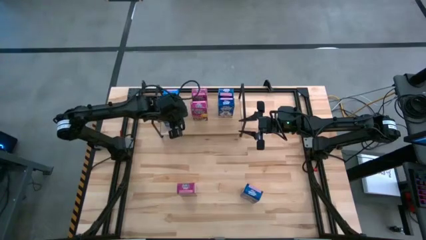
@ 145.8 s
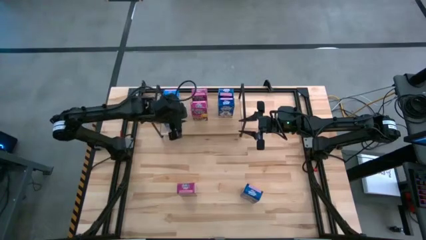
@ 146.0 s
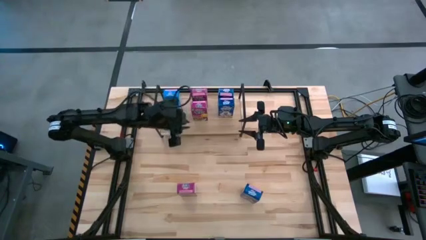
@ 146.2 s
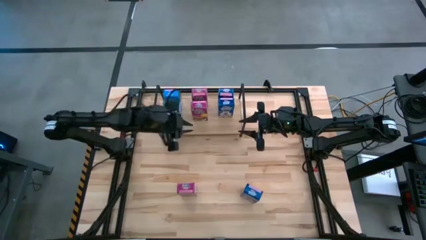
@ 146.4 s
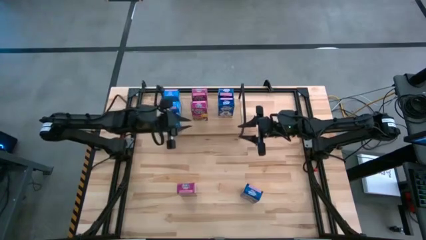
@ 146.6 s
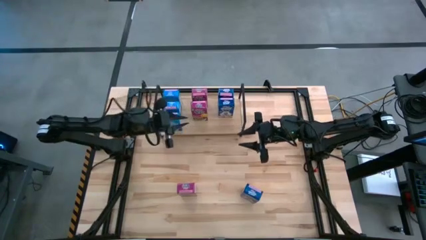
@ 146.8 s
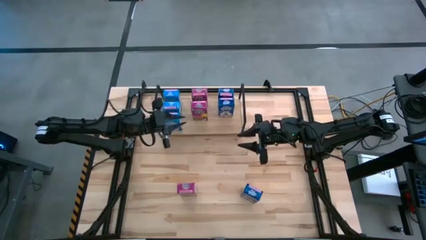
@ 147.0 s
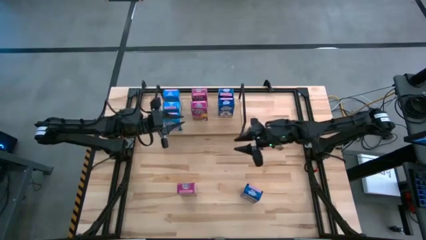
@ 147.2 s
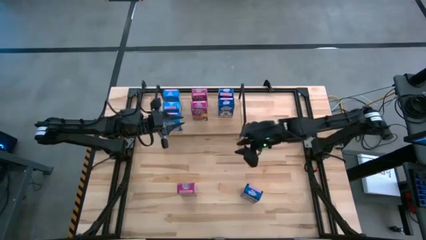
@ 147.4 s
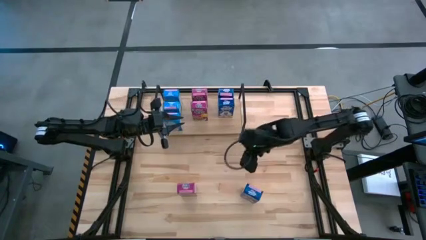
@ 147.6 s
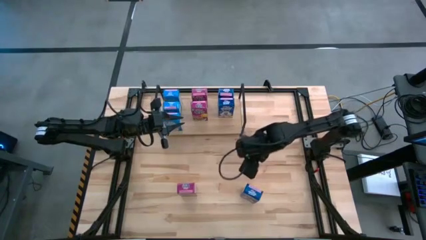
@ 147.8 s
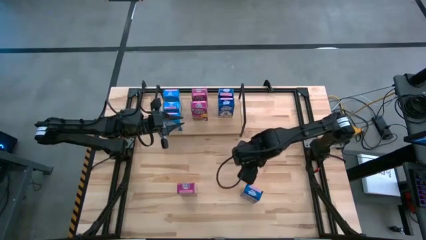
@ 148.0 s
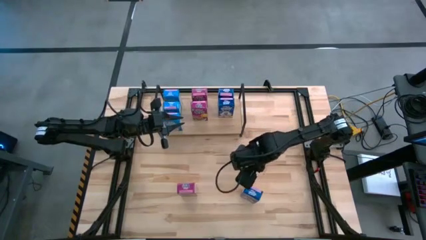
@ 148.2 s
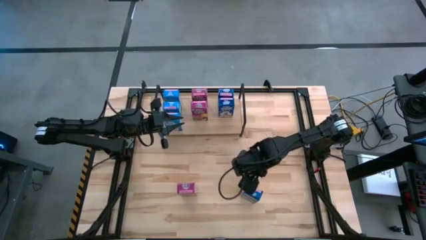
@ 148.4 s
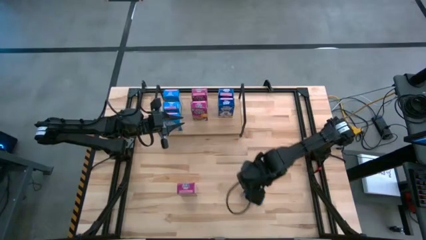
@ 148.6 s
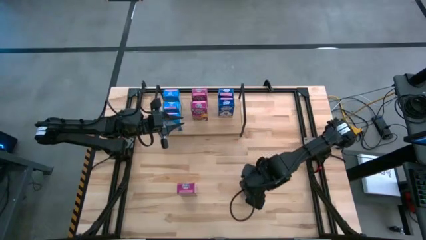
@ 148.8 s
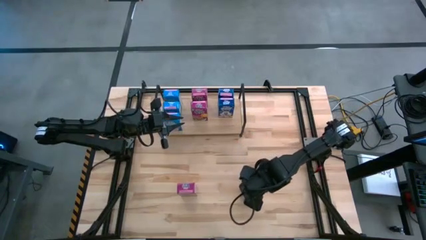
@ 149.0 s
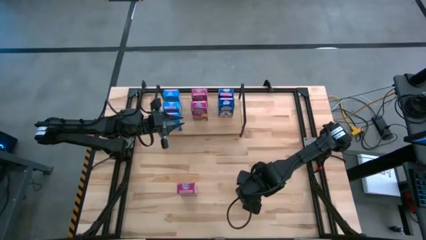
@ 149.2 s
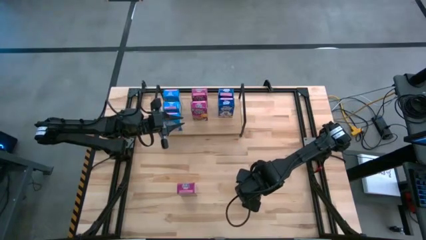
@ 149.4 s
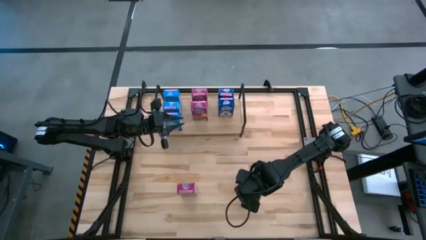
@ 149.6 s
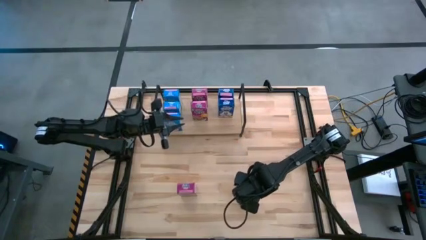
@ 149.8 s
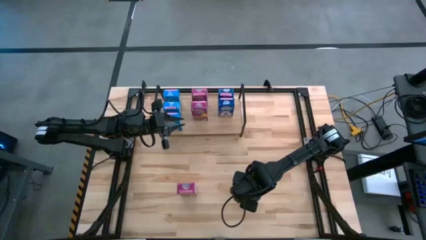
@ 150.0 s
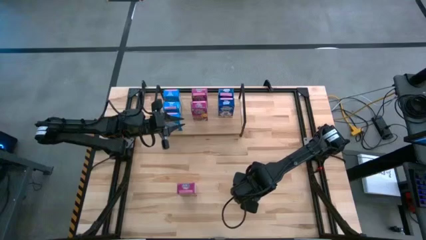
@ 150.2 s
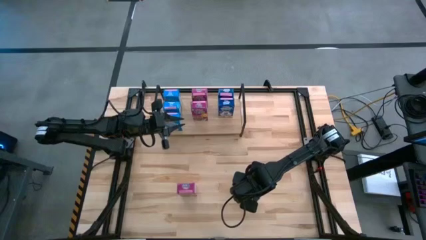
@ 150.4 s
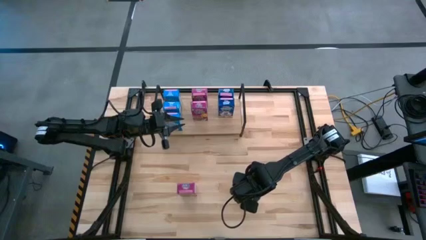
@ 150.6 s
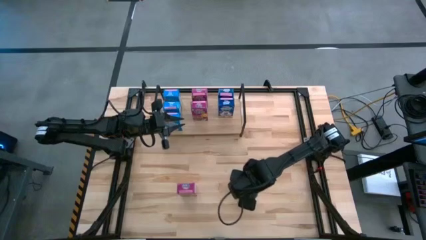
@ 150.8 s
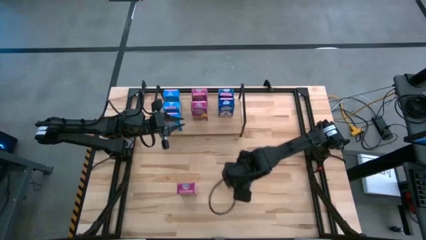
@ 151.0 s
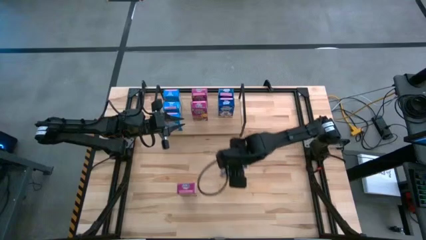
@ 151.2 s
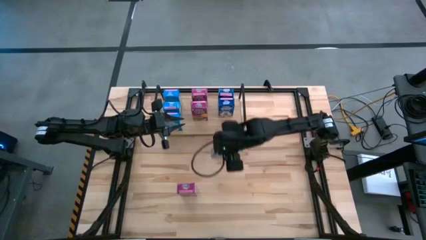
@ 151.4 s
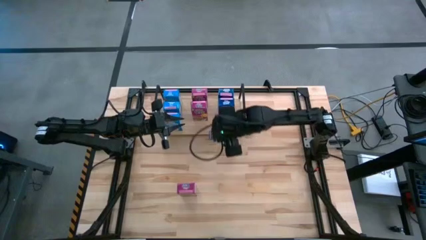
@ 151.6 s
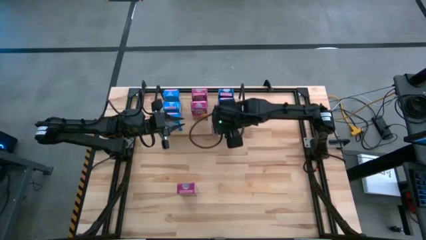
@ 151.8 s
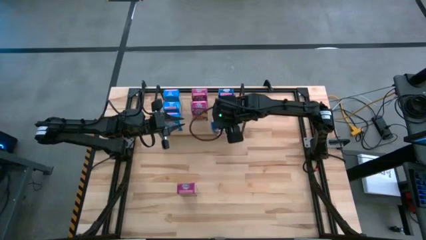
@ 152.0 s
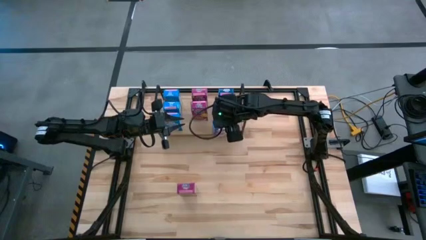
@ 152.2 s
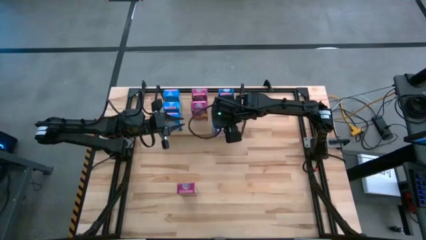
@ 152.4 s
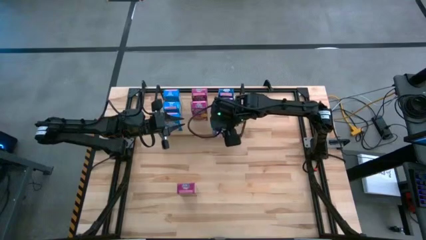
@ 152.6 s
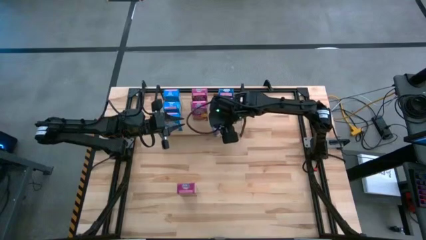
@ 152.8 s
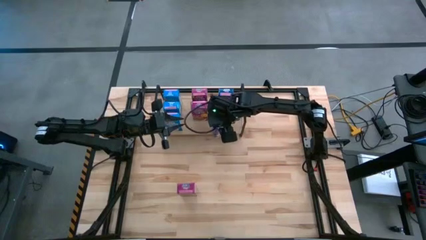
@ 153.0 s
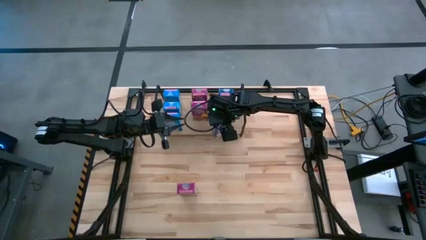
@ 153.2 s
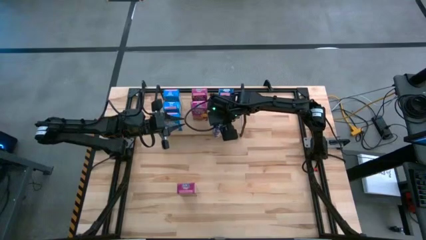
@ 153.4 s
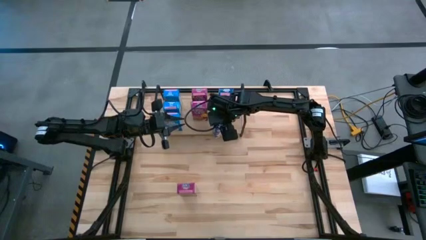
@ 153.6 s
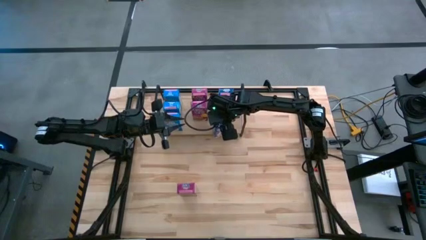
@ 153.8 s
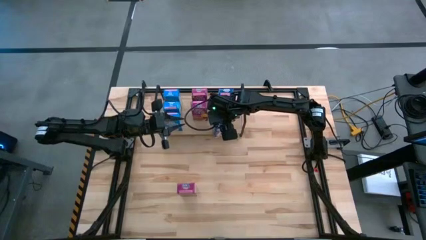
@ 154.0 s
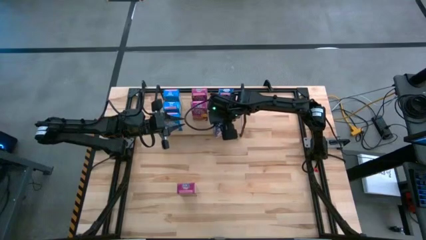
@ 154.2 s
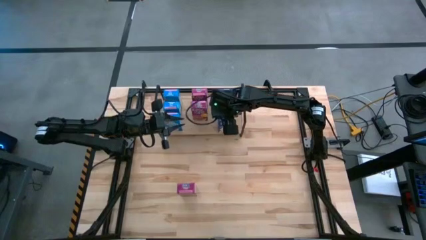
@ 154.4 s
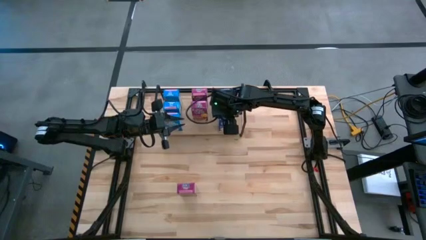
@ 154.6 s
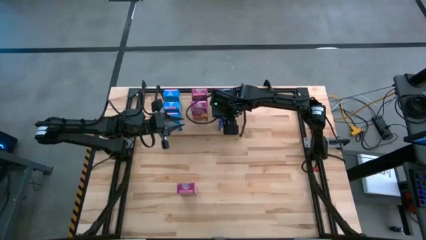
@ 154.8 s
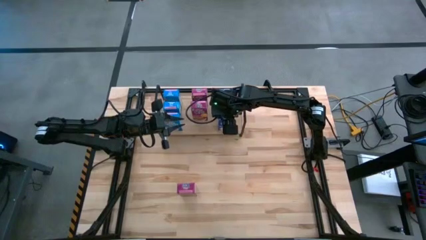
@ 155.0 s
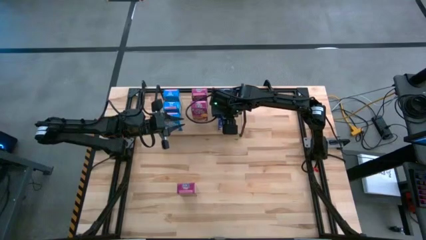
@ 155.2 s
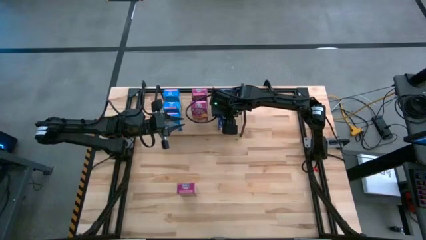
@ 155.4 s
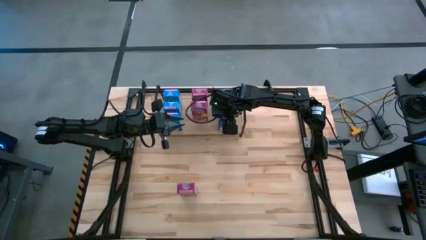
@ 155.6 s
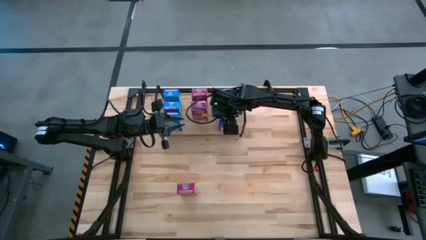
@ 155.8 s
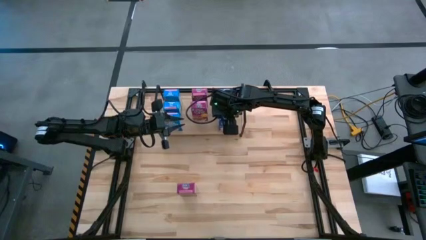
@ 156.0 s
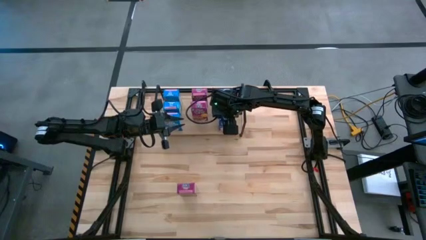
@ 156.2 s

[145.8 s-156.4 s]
Task: Stack cereal on shelf
Put the blue cereal box on the shelf aligned with the blue cereal box

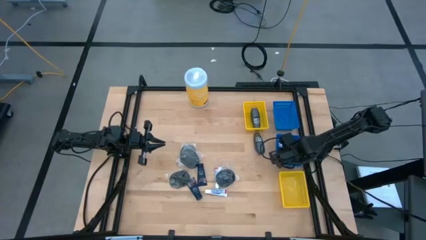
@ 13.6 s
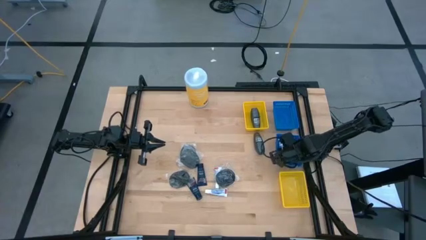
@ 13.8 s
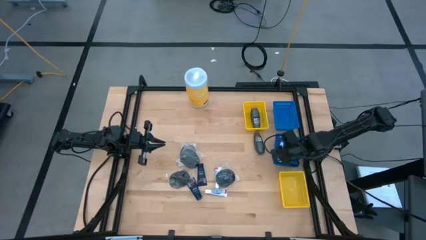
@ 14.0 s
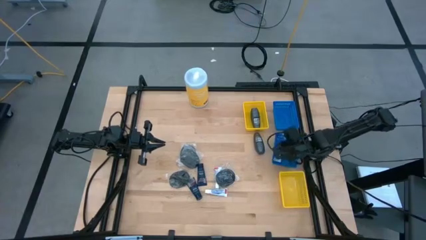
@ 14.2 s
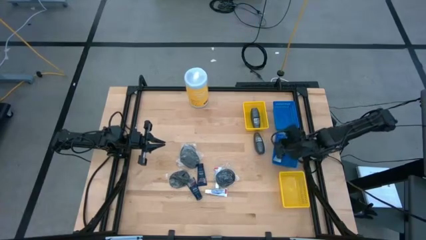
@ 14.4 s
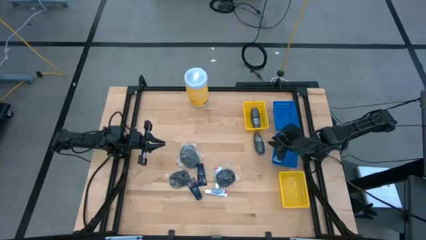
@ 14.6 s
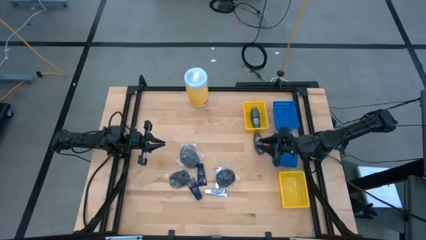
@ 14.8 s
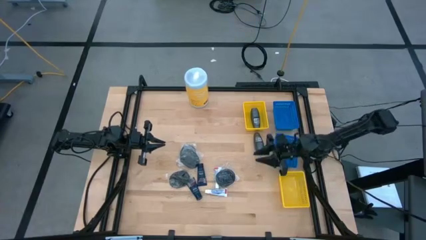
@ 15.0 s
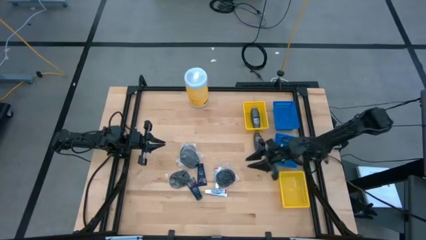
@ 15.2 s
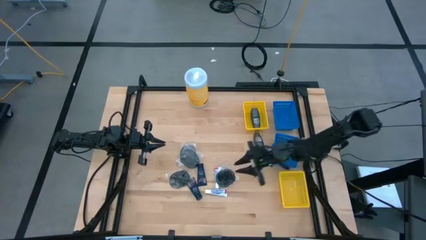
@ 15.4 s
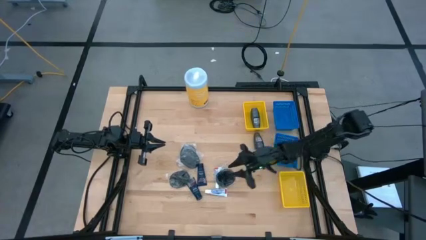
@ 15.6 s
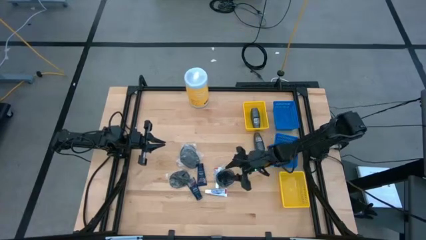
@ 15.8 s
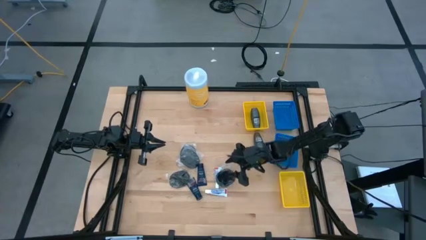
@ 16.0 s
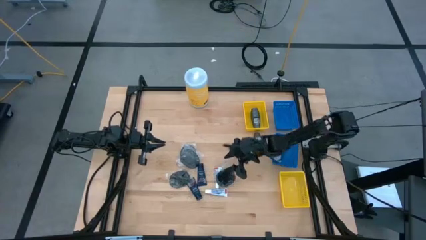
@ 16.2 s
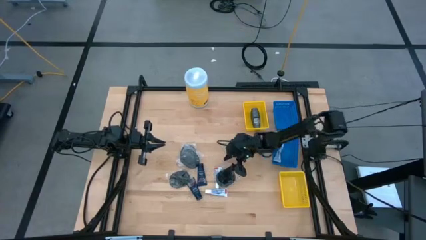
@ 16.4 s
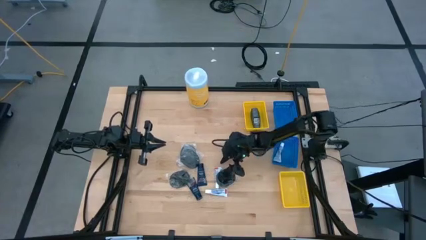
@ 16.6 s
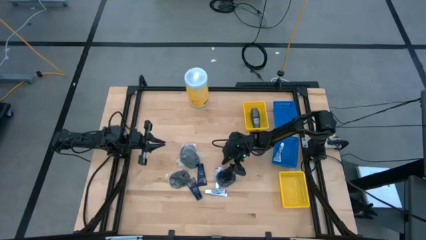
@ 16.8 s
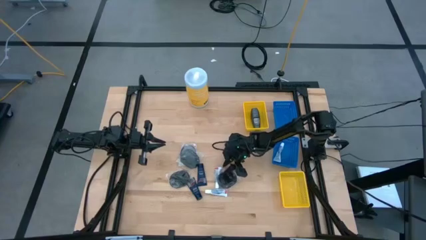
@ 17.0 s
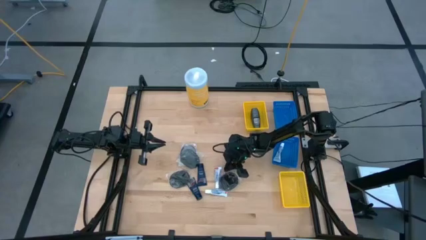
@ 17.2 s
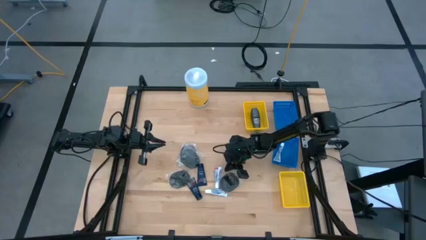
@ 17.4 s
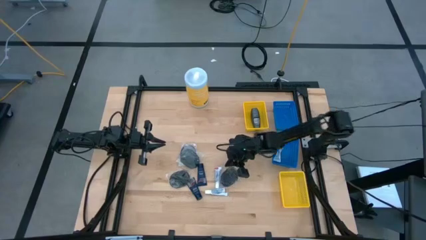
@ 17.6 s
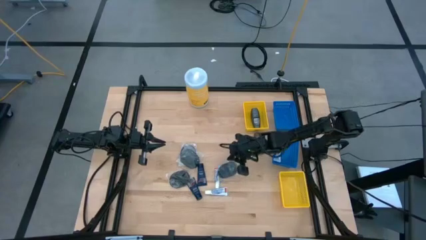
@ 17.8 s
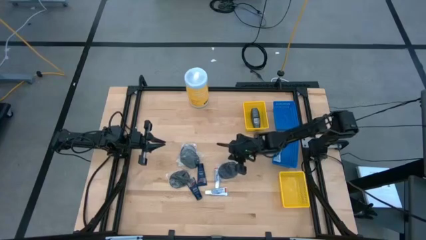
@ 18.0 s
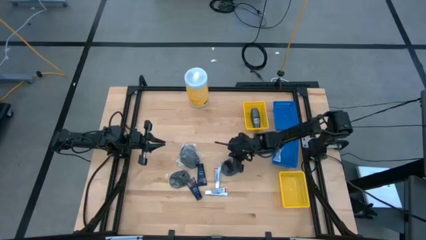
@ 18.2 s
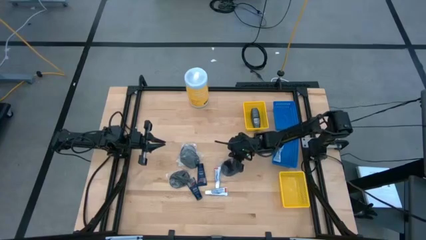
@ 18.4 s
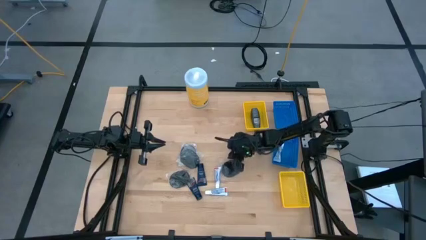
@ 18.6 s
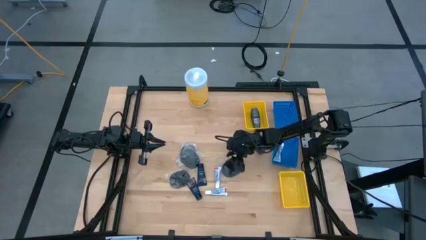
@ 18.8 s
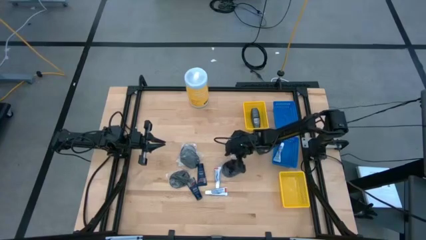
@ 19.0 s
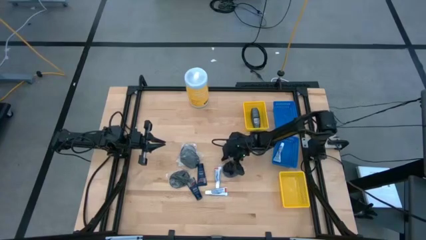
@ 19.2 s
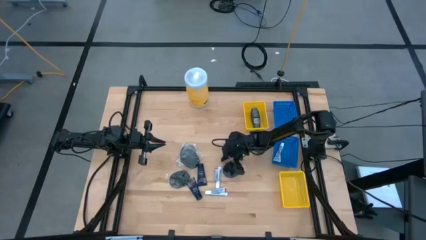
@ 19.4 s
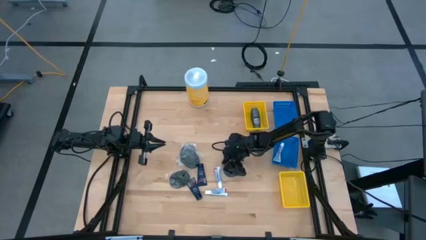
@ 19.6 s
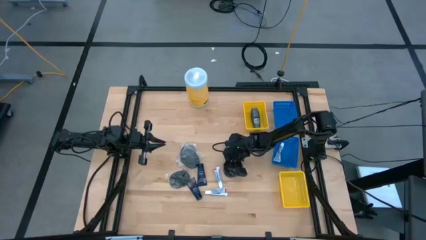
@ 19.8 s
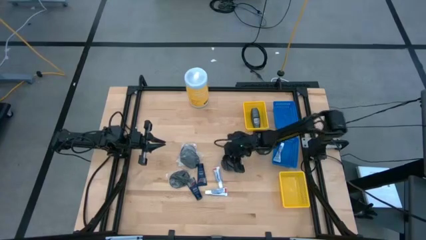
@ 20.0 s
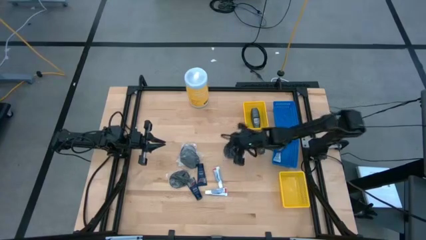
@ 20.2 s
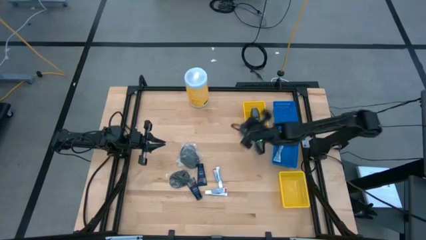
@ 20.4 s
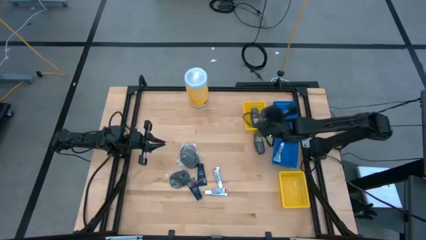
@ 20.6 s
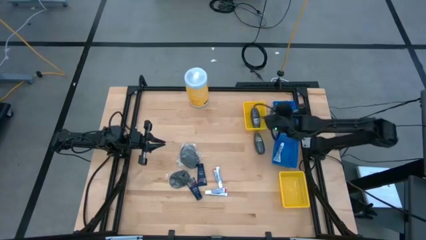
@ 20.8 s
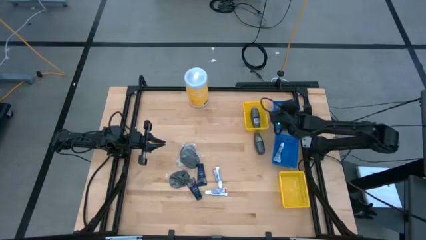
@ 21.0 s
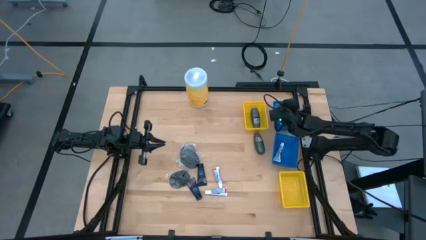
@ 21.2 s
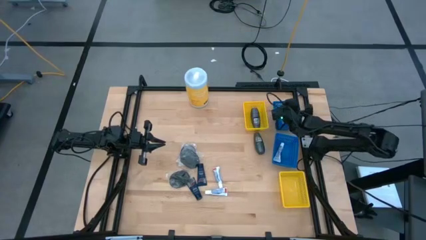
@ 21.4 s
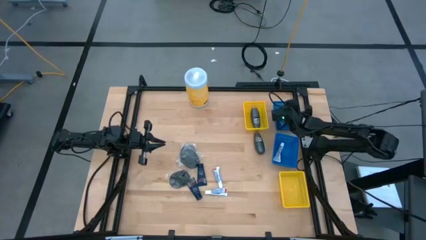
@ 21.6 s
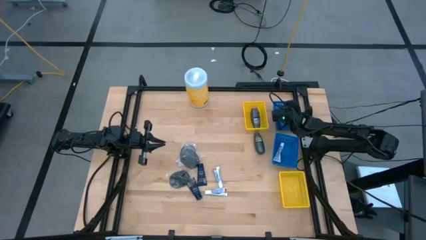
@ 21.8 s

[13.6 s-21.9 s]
Task: Pick & Place Travel size toiletries
Put the right black hairbrush into the top blue basket
